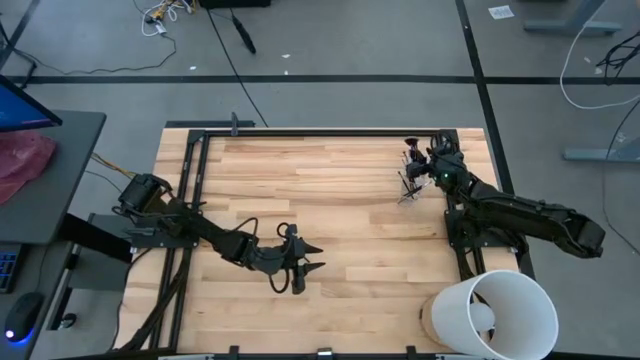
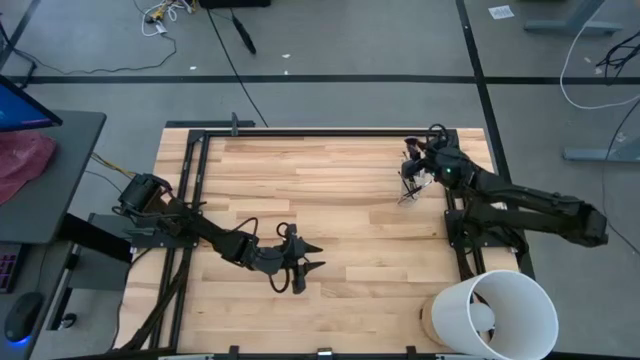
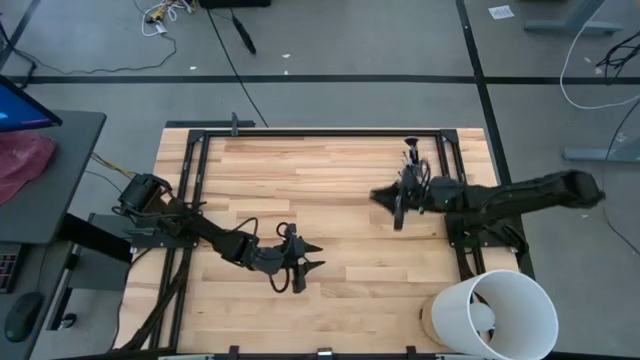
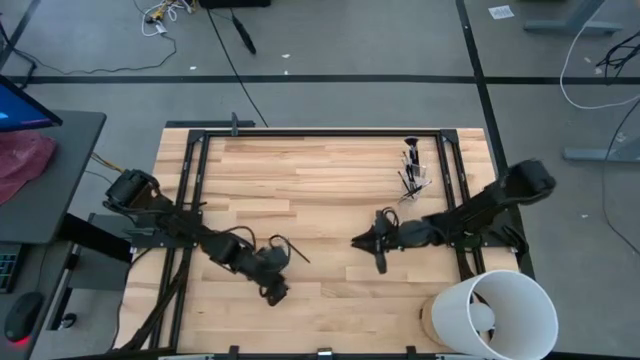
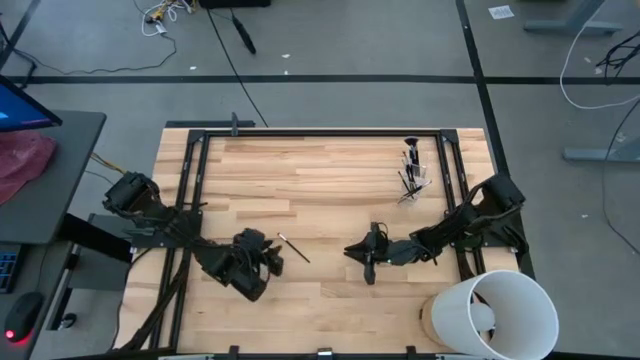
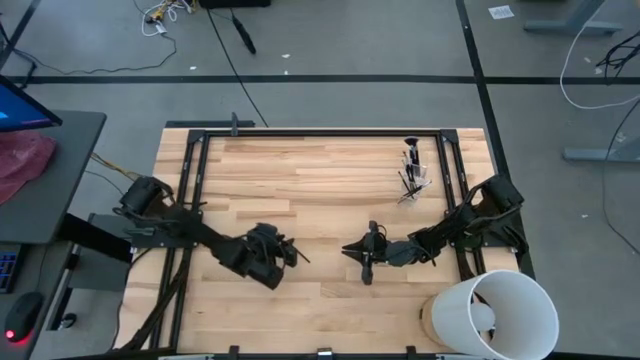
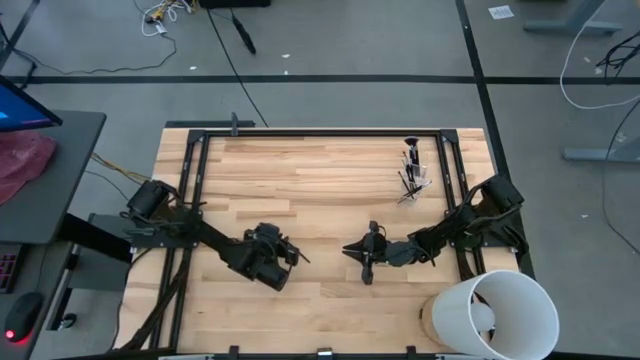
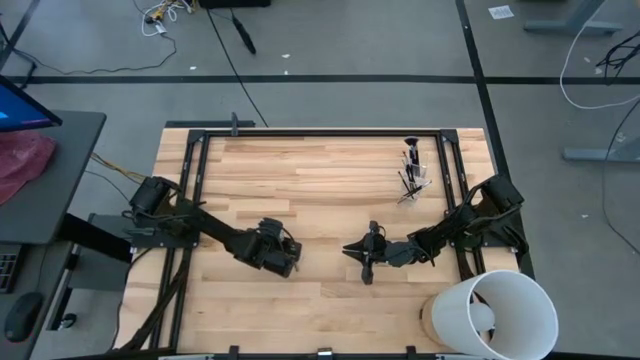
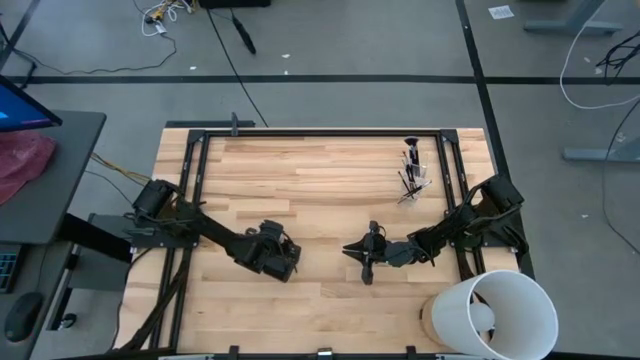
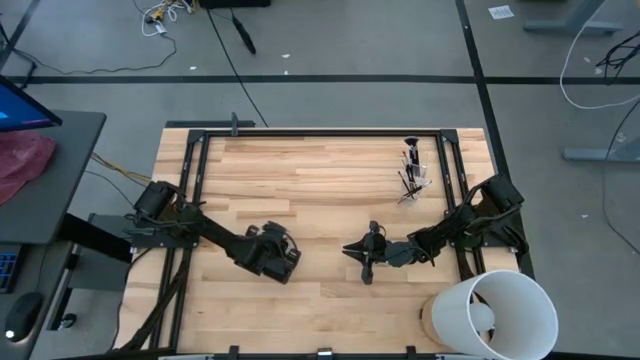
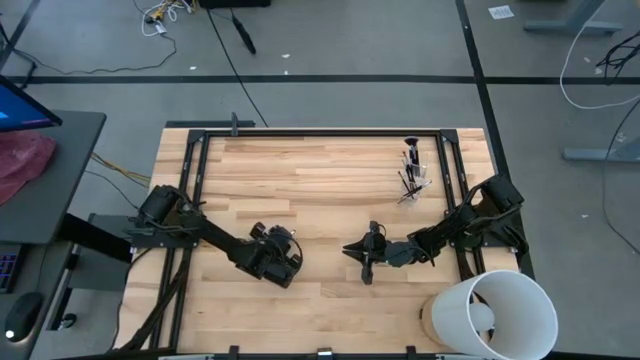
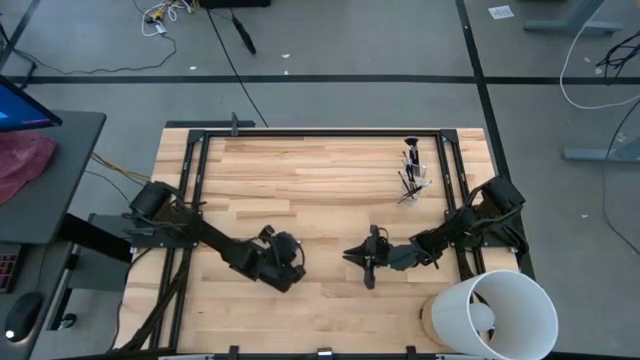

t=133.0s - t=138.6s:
Task: Put items in baskets/containers
Put the eyeshadow brush into the transparent organizer

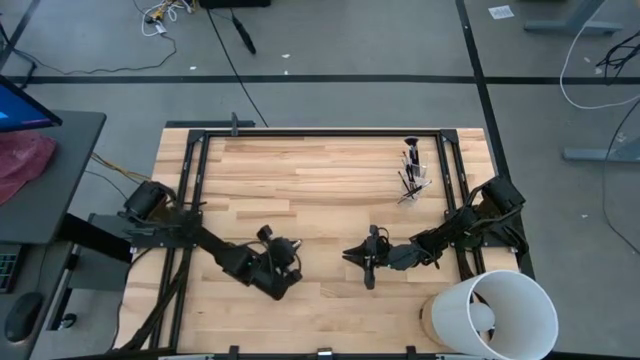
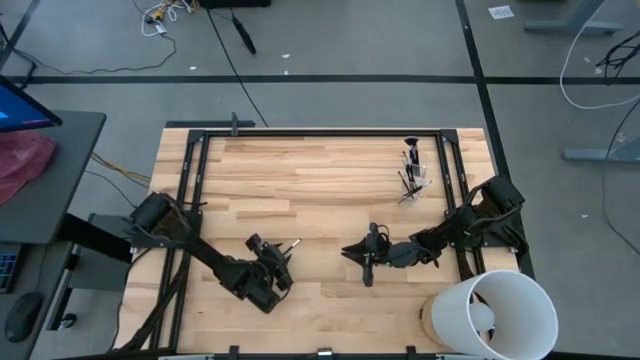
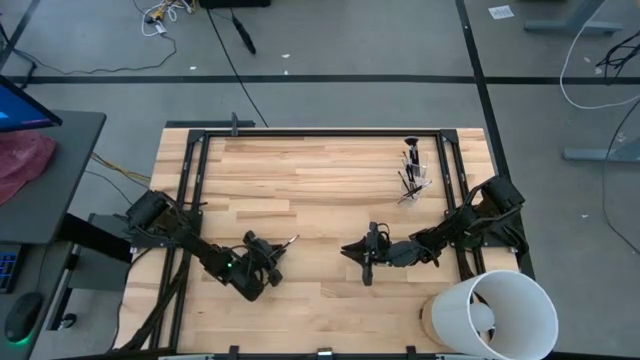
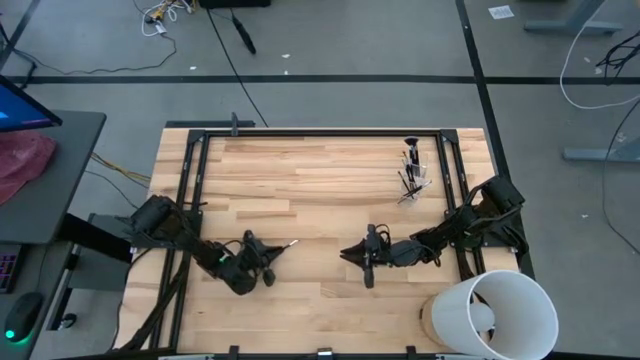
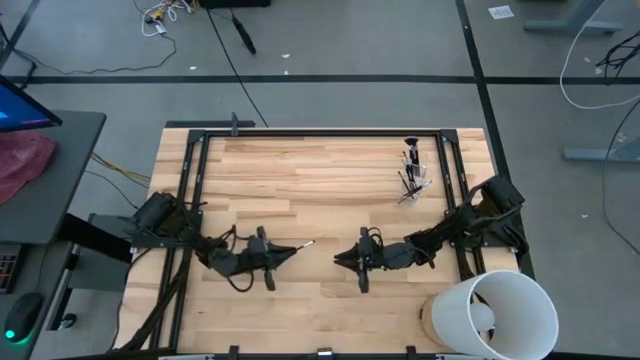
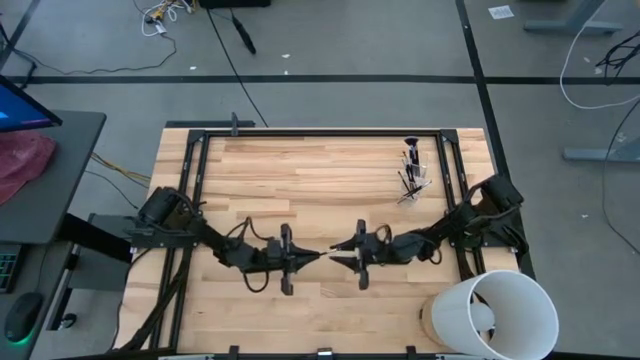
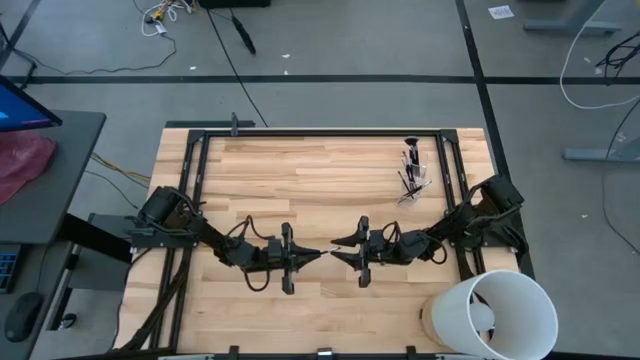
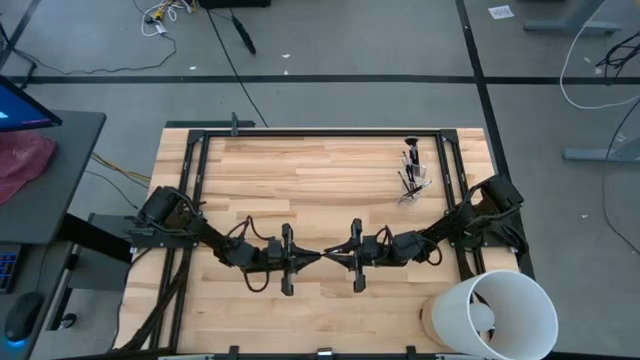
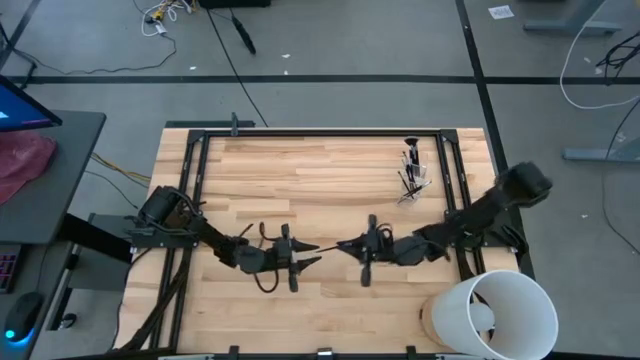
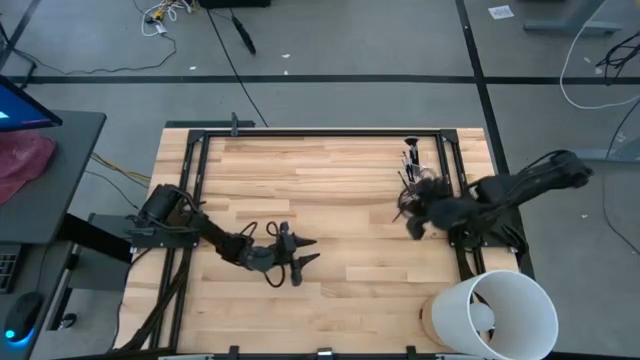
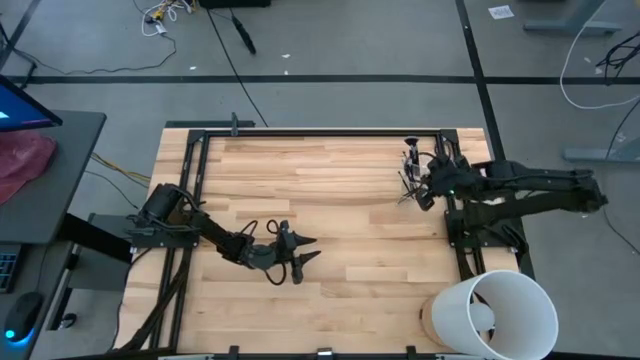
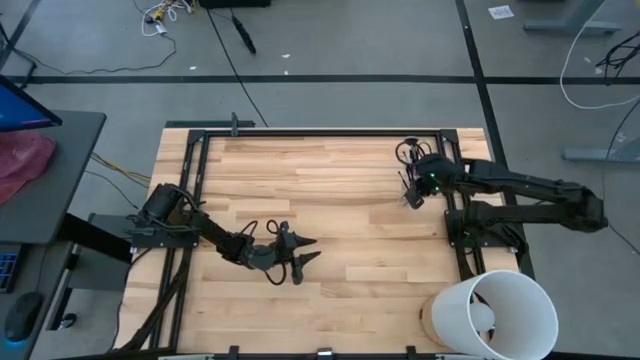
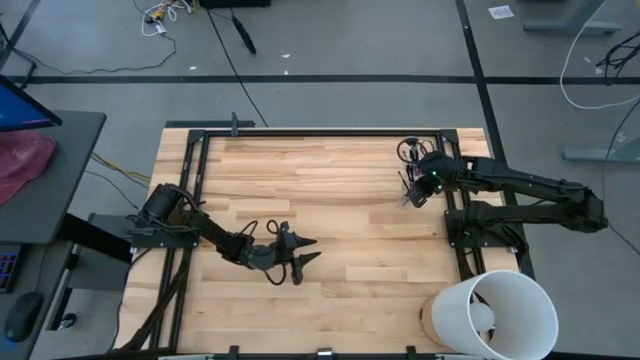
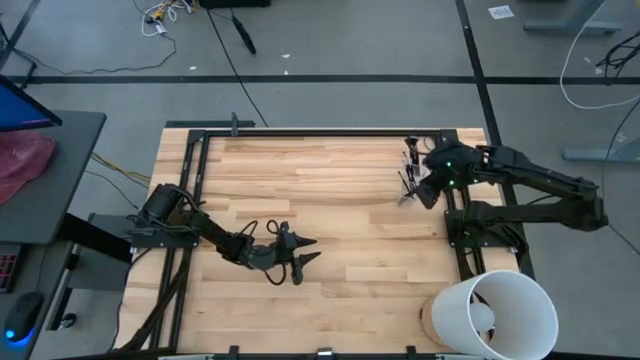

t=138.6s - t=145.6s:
Put the eyeshadow brush into the transparent organizer

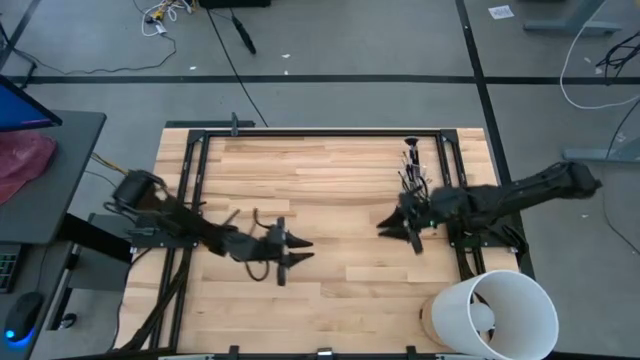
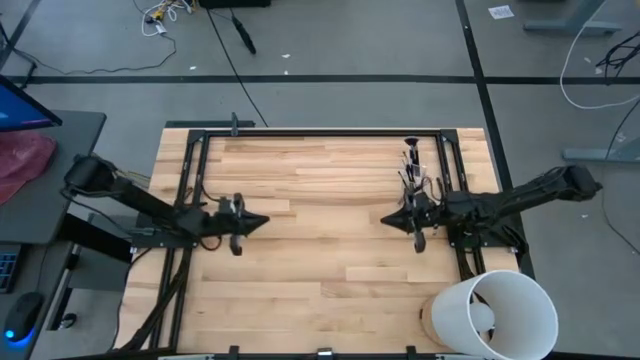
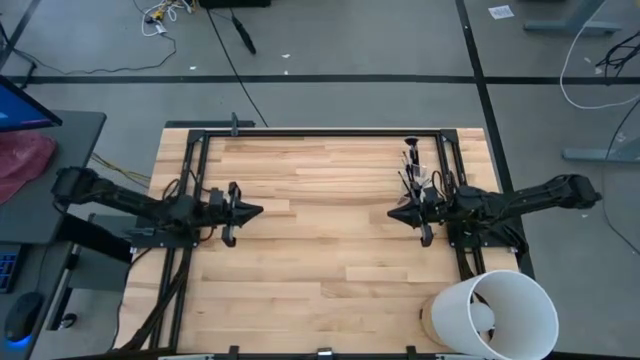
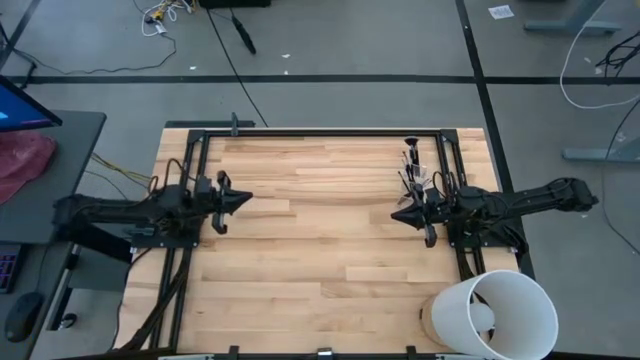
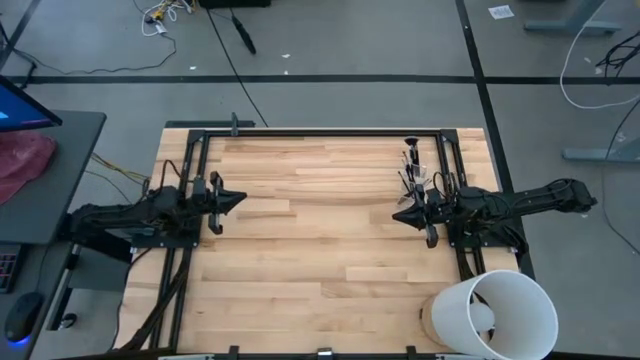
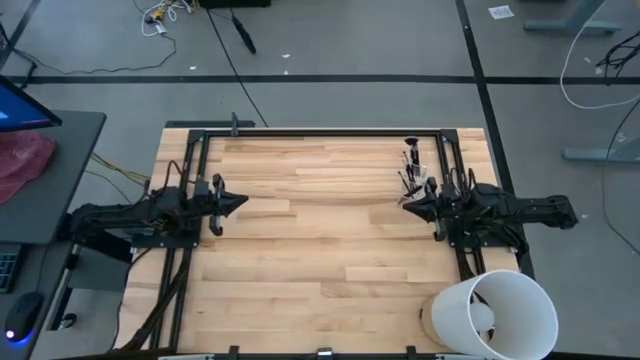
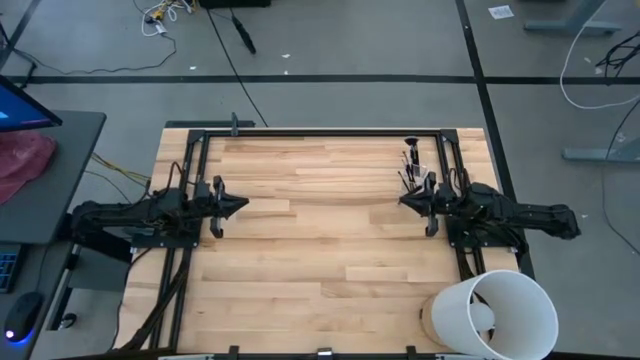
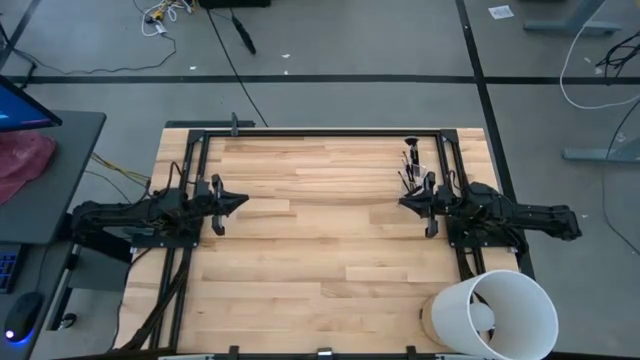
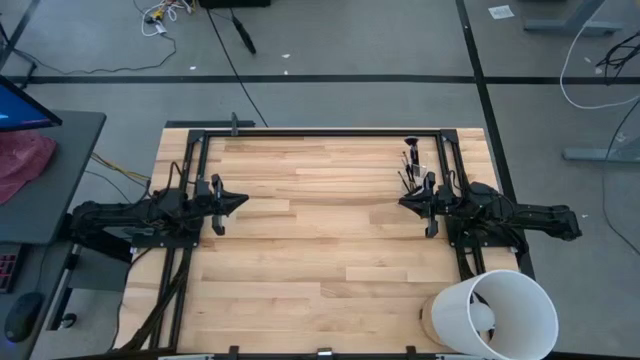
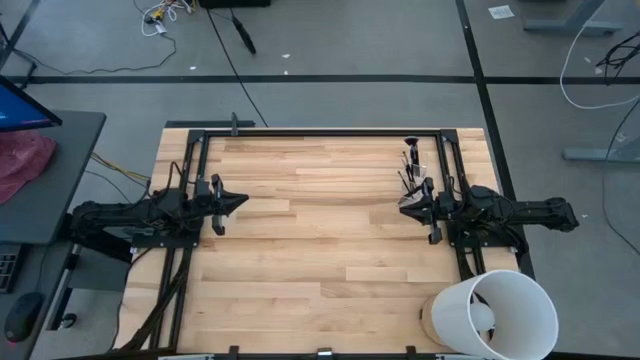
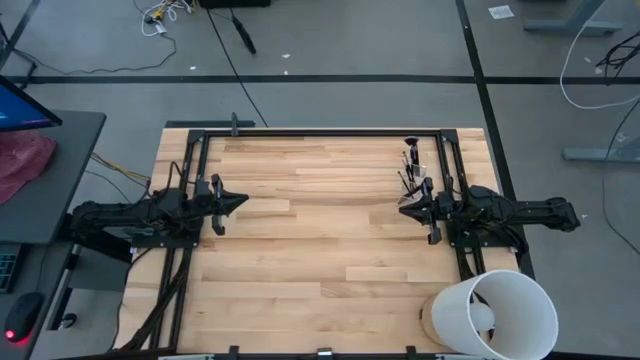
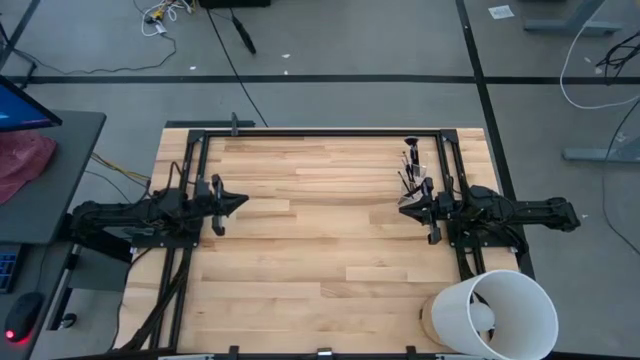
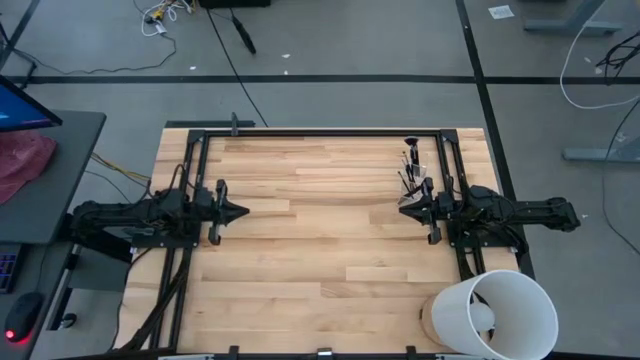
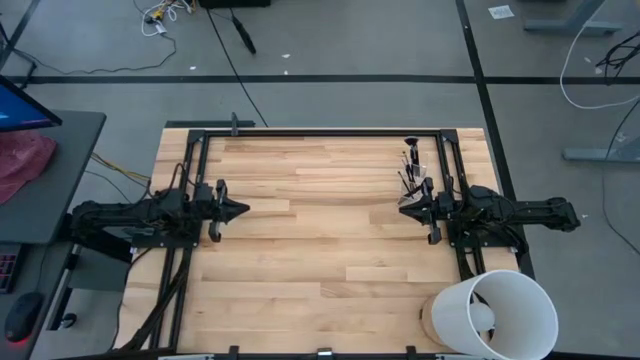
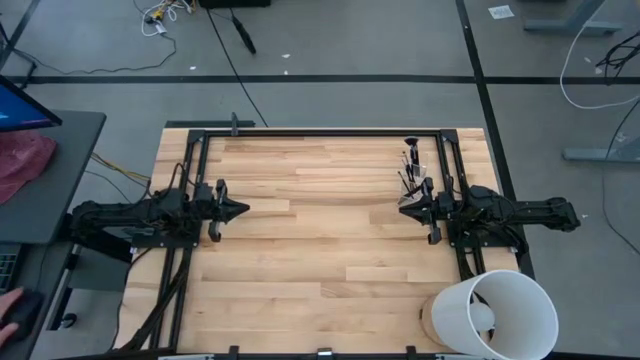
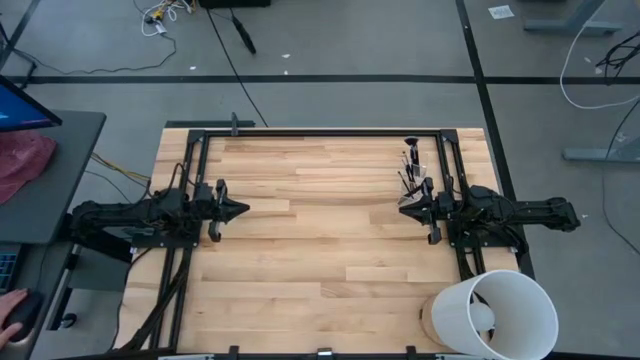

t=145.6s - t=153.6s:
Return to Home Position

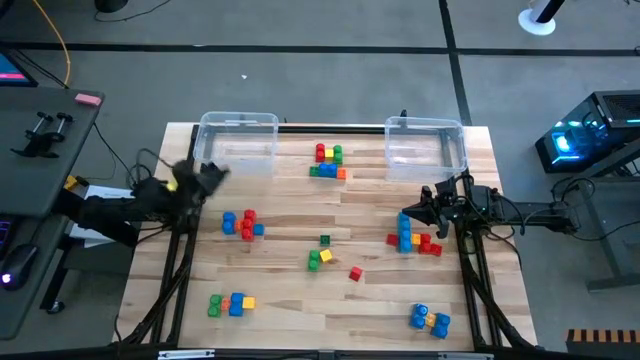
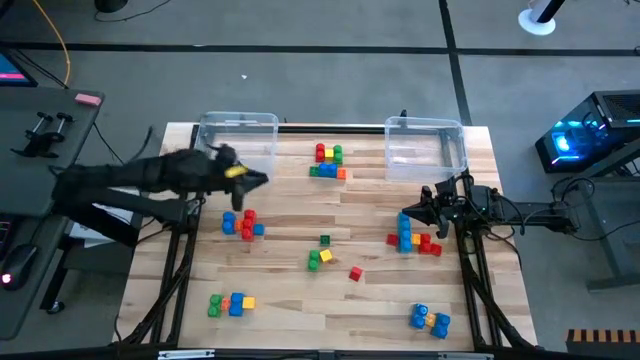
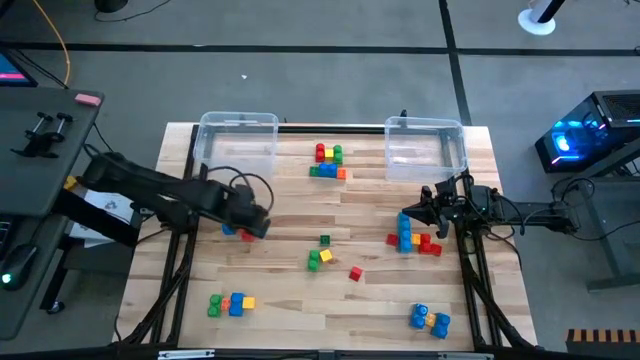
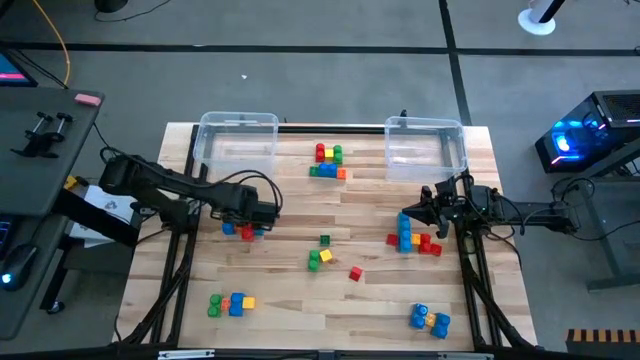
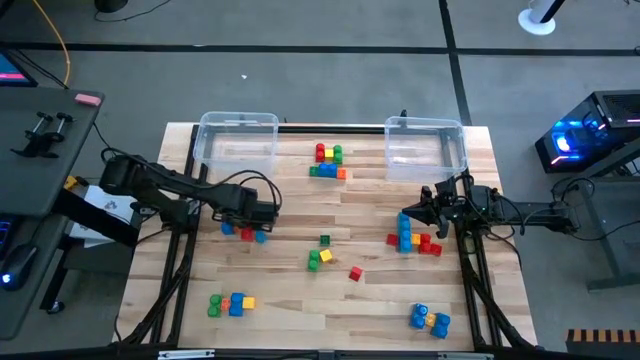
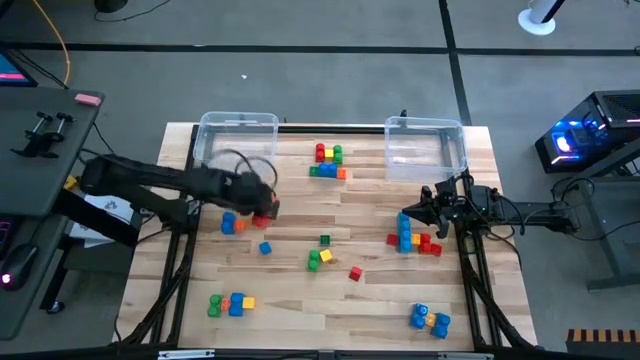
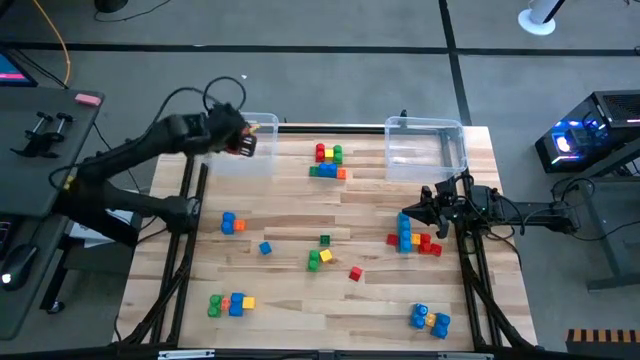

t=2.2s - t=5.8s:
Task: Sort blocks by size
Put the large game piece into the left transparent bin
